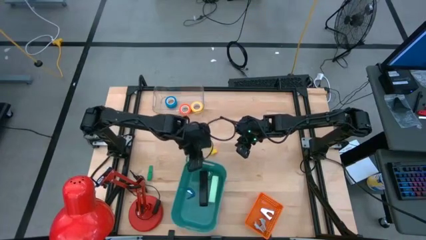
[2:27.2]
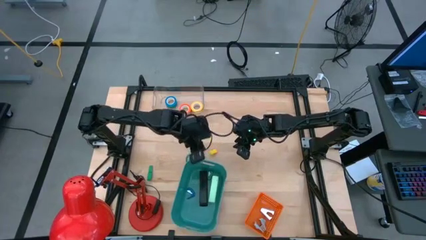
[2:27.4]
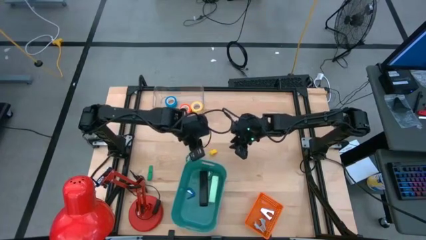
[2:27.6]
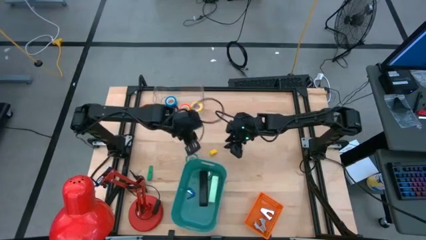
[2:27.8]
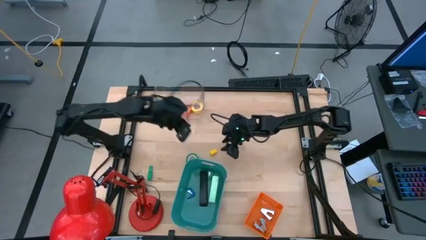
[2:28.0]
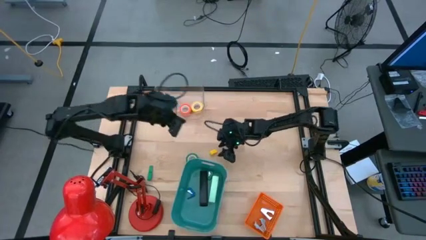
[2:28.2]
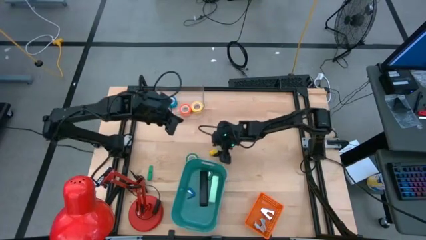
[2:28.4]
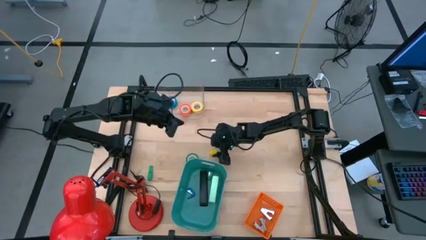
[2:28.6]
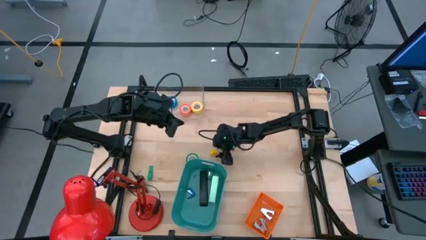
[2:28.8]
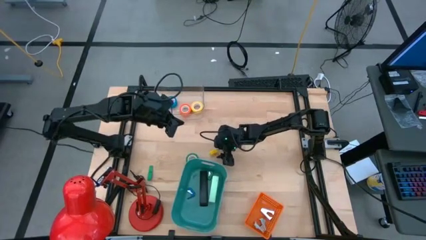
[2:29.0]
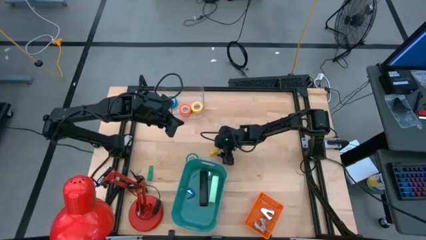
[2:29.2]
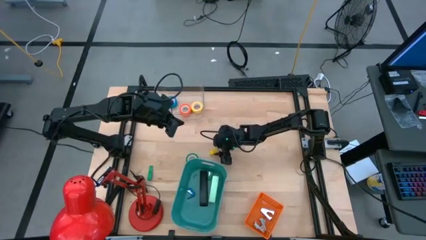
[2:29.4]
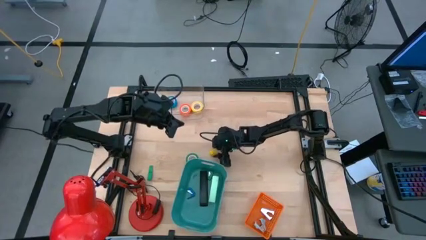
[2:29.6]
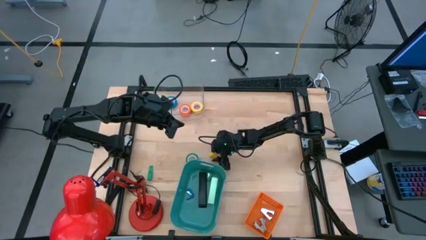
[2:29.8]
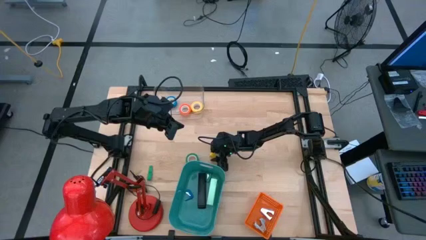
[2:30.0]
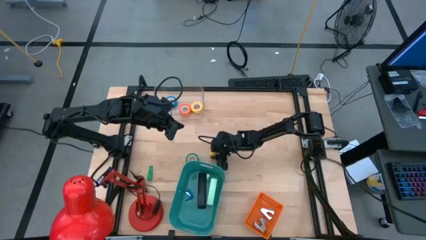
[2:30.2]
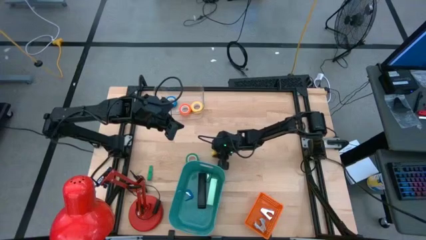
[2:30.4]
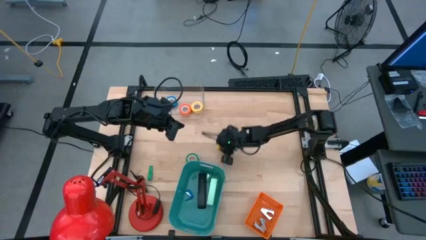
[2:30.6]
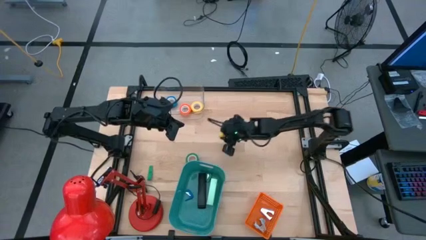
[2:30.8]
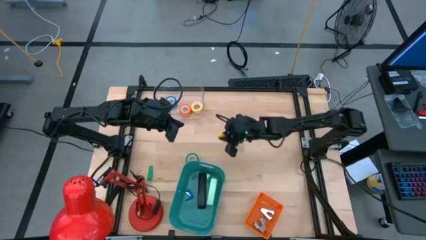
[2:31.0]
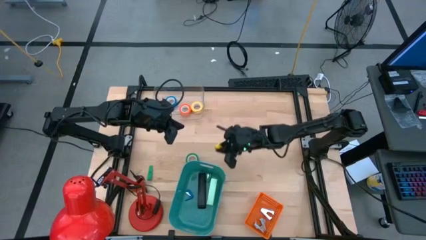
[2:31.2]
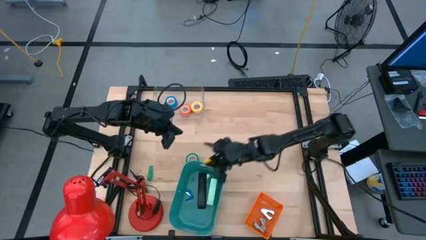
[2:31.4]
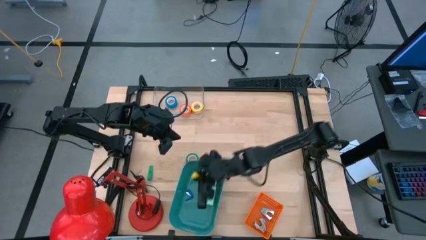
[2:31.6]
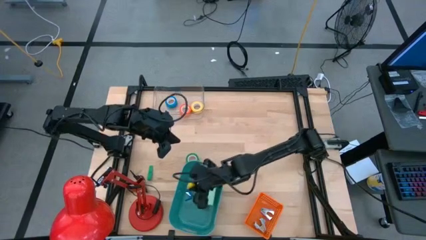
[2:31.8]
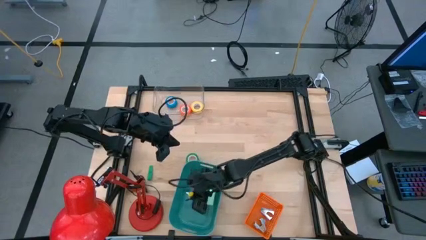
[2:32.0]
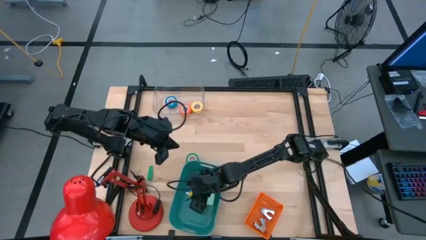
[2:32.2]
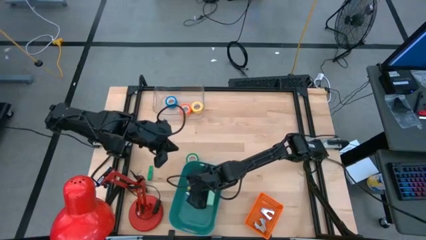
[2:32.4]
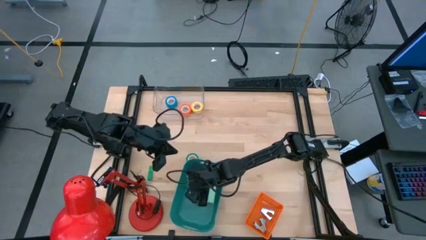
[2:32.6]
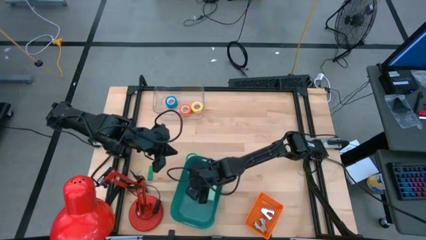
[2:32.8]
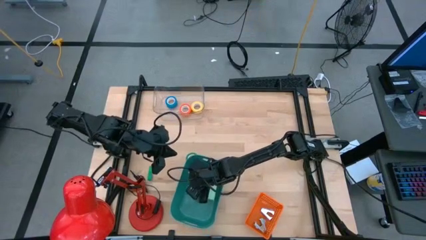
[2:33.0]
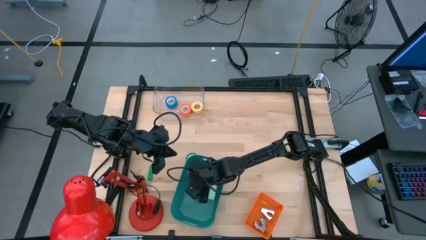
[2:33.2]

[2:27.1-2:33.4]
Task: Pick and place Stapler, Stapler remover, tape
Put the yellow stapler into the green bin

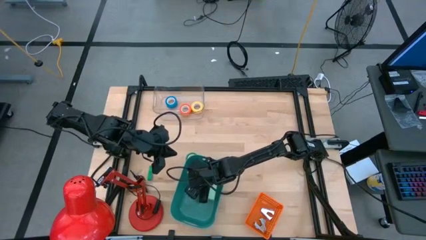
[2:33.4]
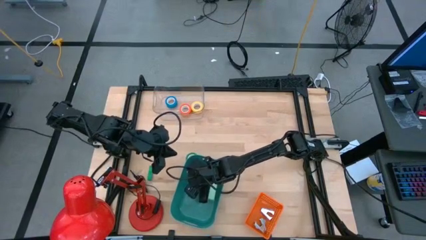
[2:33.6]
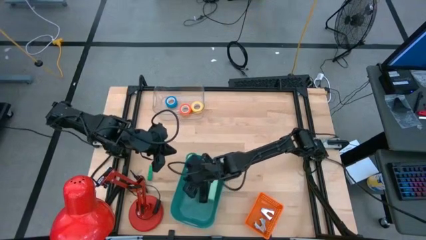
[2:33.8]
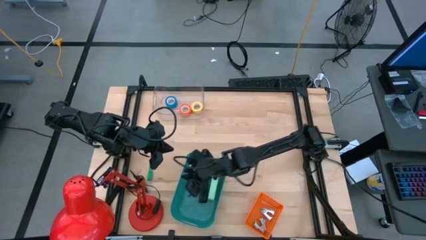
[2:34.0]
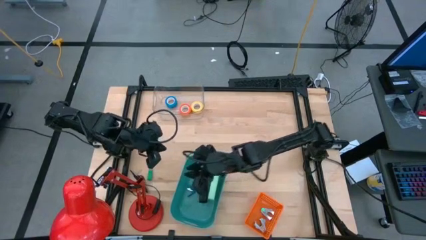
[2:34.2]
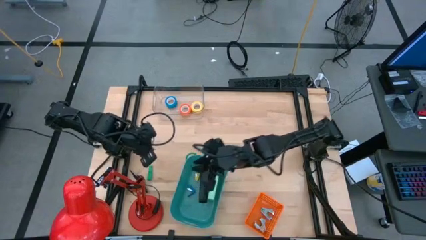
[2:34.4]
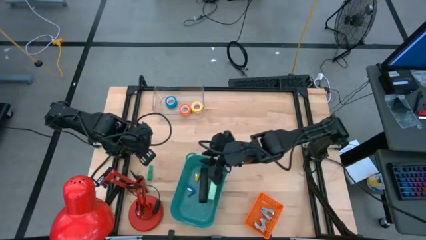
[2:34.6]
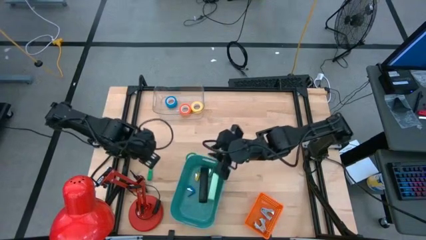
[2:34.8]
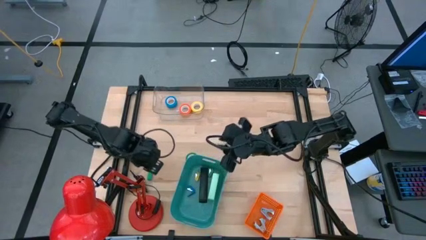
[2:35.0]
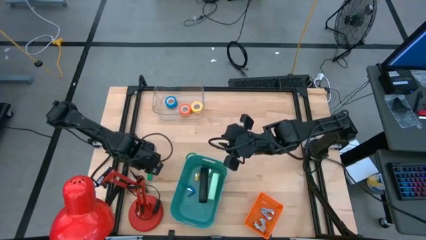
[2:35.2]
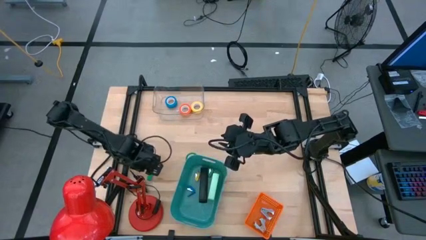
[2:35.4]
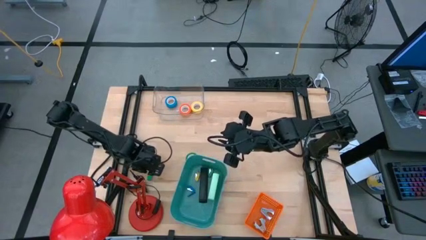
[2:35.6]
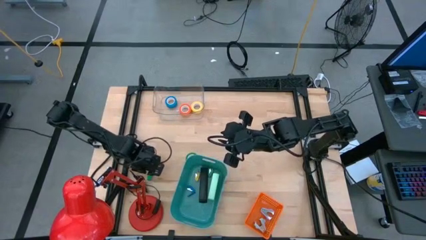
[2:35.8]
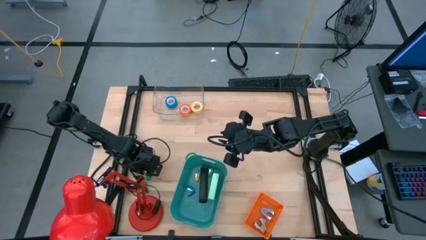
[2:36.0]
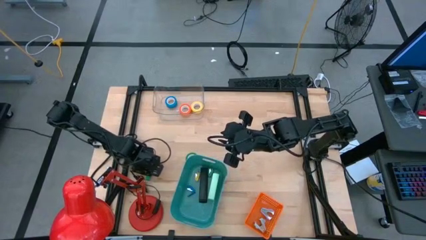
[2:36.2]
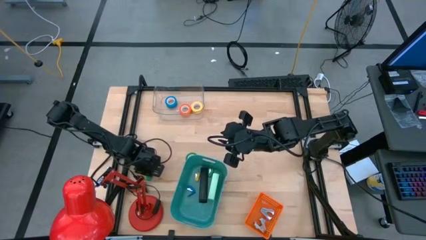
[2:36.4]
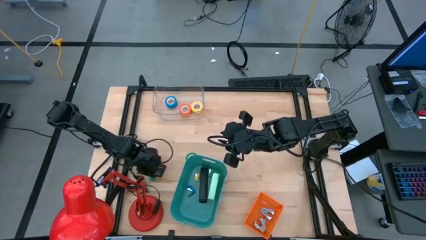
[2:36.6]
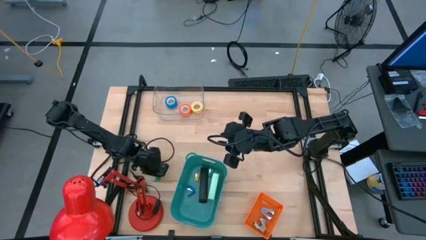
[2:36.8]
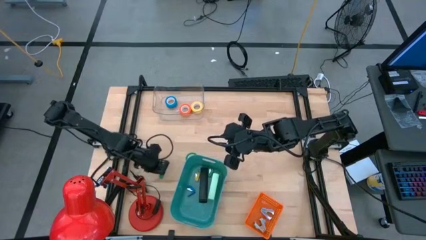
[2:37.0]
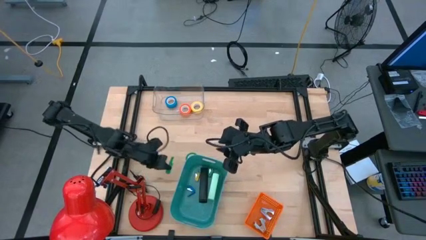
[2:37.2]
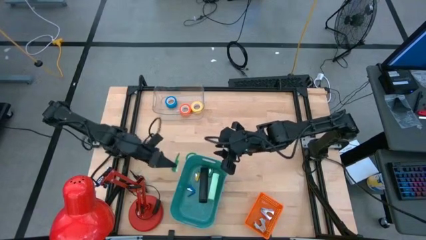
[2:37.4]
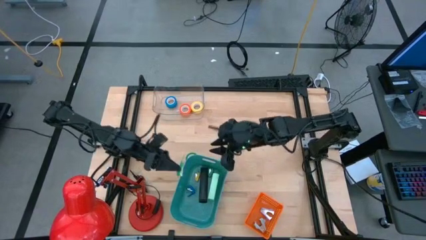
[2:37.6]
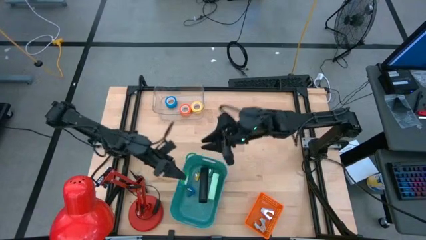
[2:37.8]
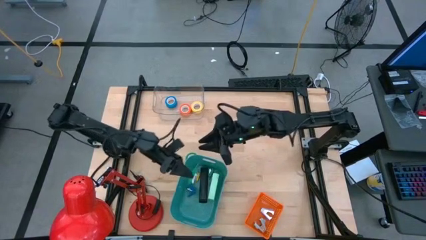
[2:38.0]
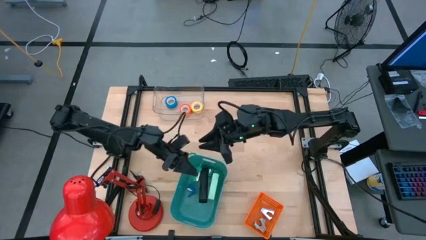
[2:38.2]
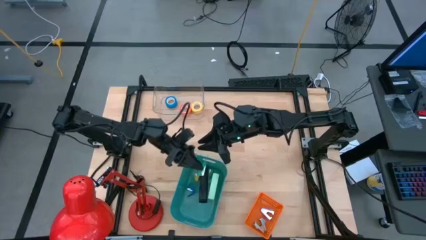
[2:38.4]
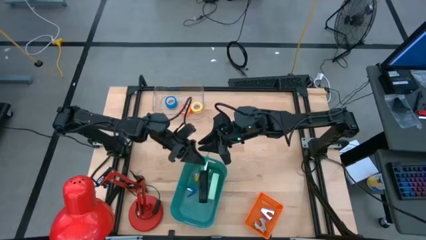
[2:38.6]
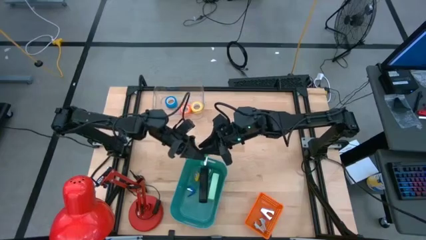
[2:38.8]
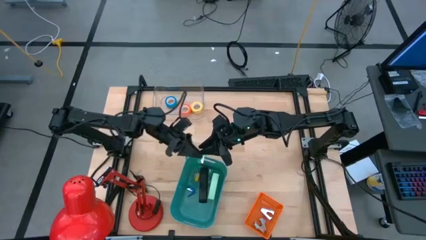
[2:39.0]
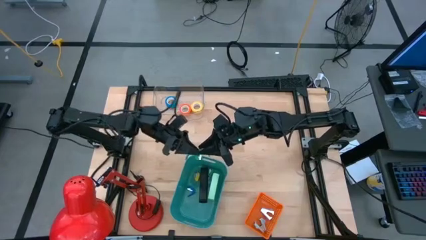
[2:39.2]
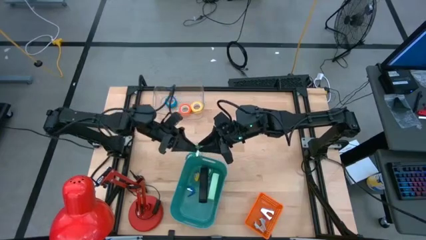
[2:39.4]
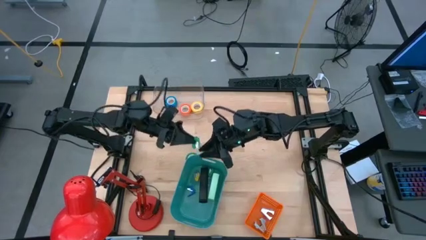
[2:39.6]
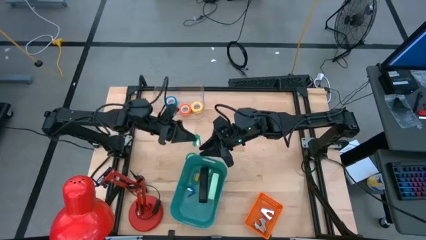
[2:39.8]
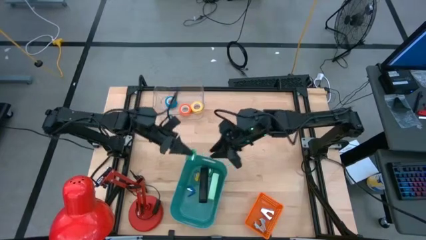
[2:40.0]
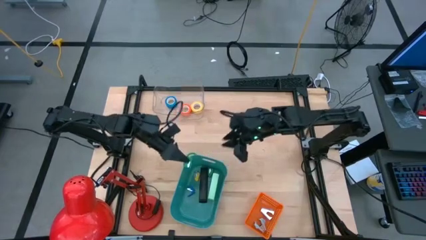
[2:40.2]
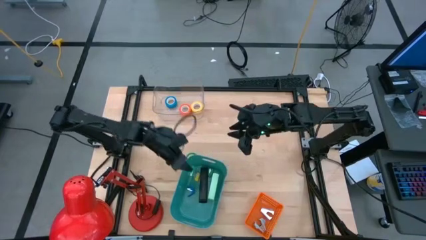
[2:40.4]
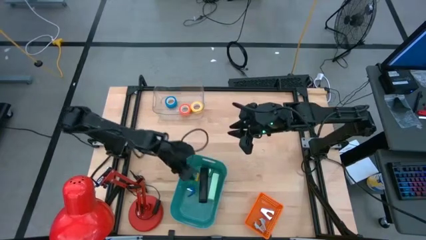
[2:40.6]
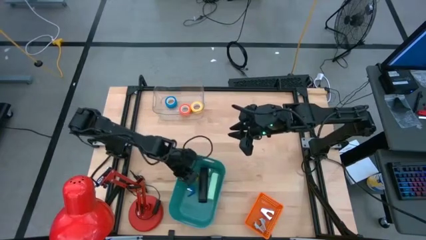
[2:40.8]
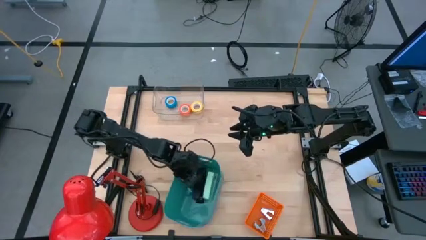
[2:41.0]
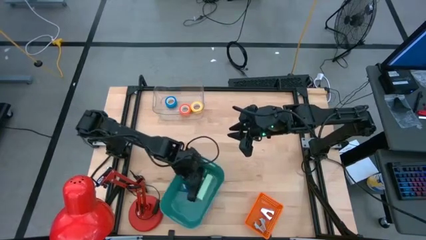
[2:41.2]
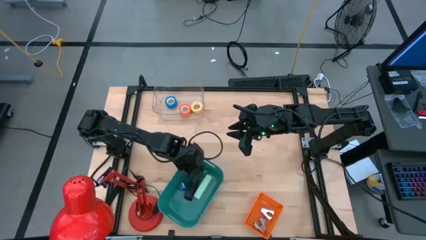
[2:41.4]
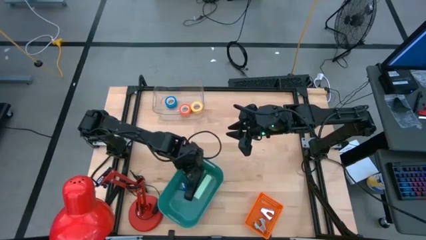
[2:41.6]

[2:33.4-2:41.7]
Put the green stapler into the green bin

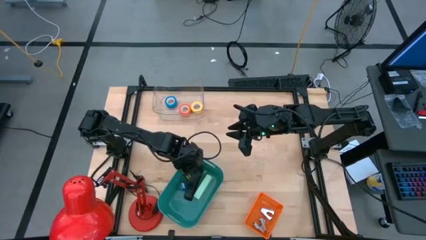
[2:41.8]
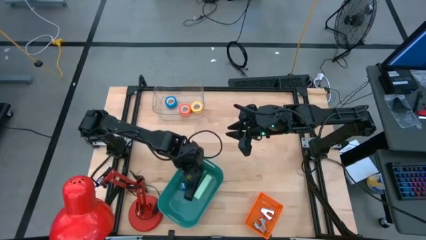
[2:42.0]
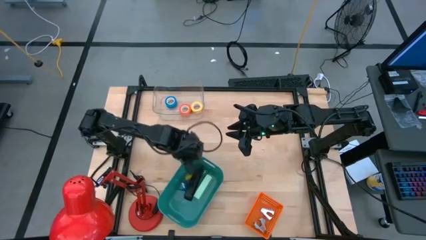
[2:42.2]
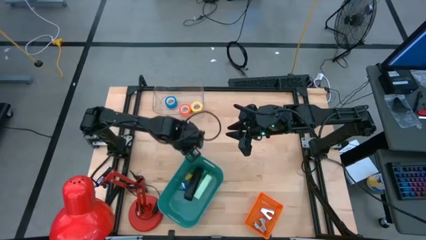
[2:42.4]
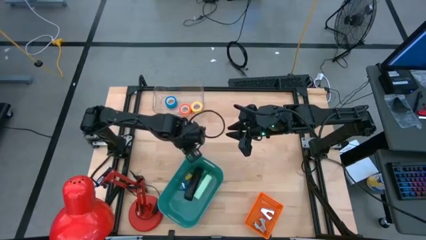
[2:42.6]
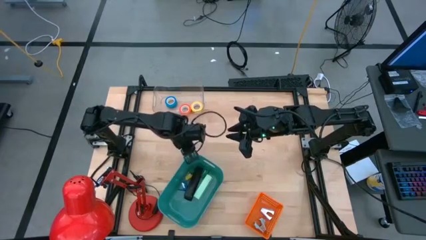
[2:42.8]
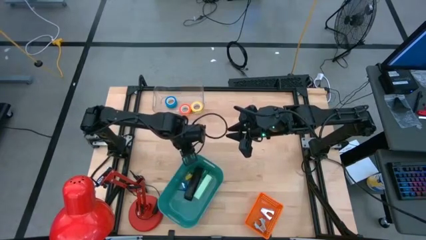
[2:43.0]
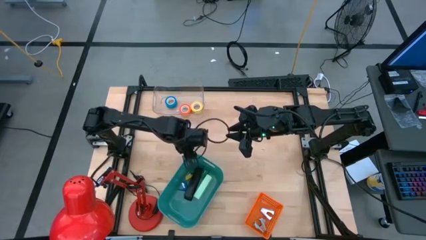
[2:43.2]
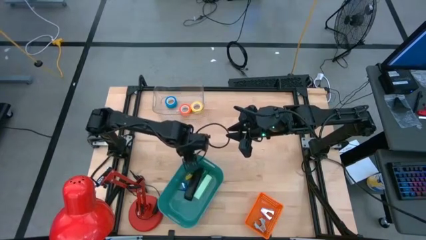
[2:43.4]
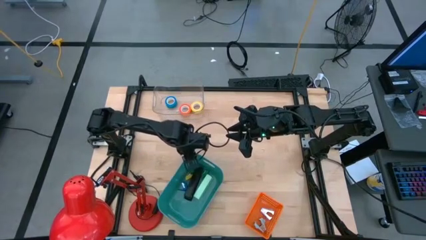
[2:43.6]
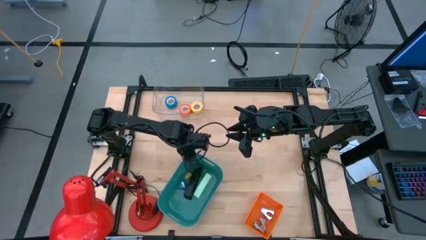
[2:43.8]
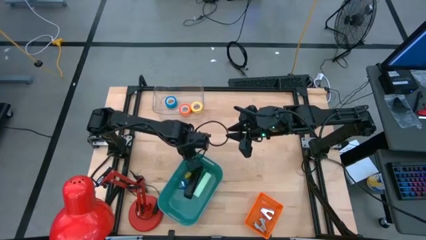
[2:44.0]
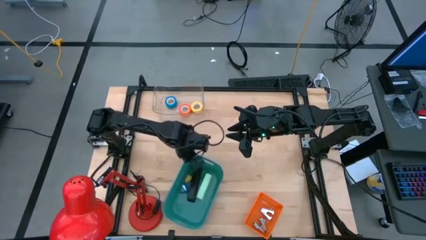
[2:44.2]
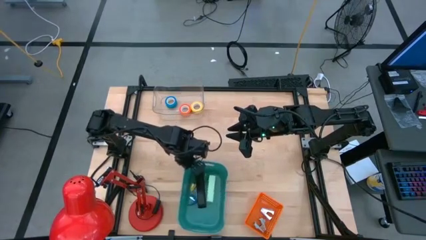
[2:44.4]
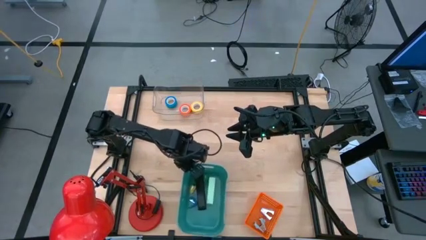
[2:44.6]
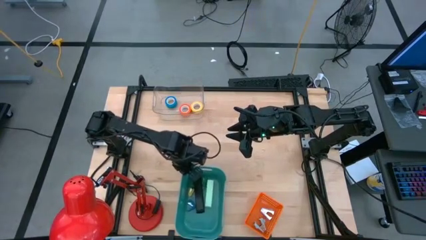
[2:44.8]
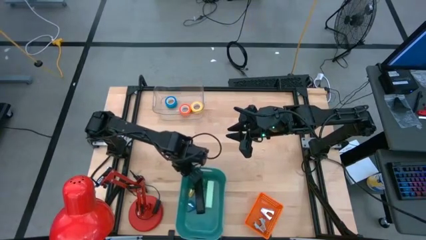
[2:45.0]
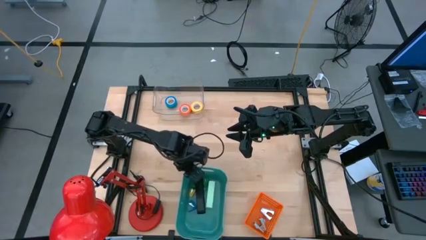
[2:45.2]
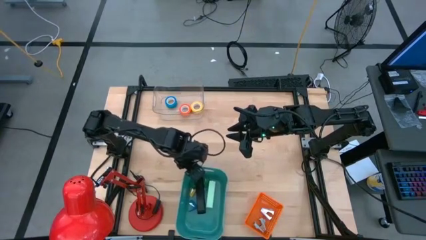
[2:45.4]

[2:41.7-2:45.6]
Adjust the green bin
